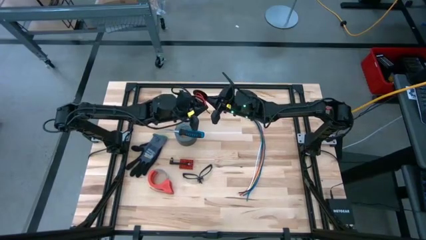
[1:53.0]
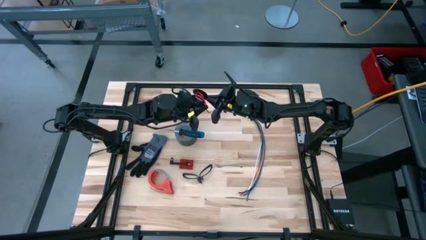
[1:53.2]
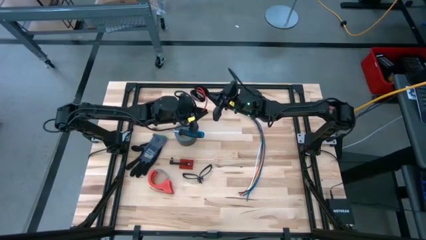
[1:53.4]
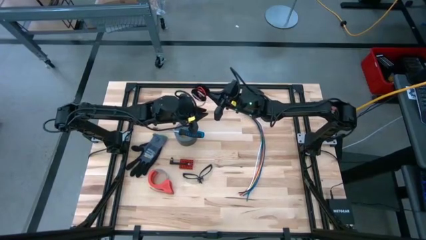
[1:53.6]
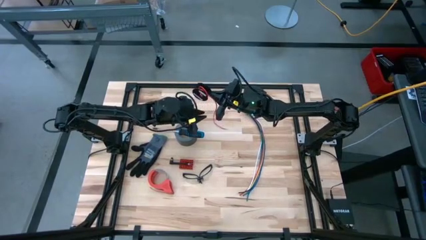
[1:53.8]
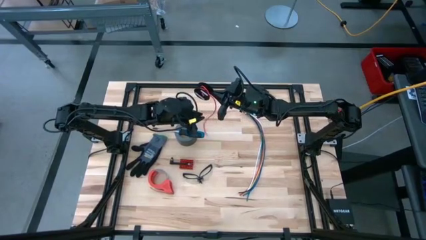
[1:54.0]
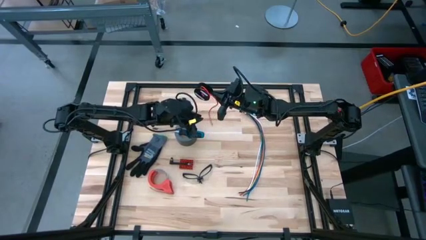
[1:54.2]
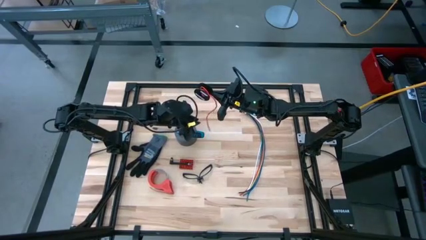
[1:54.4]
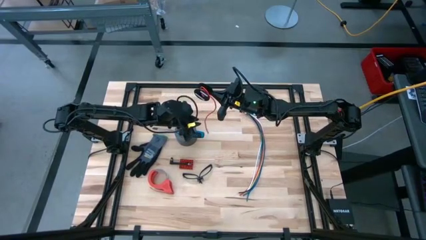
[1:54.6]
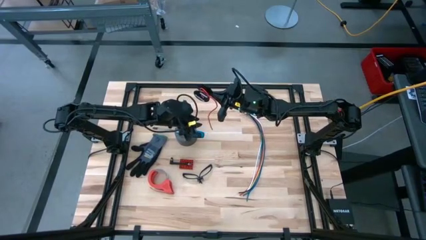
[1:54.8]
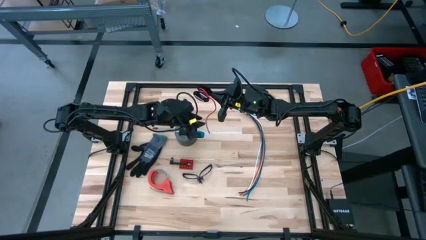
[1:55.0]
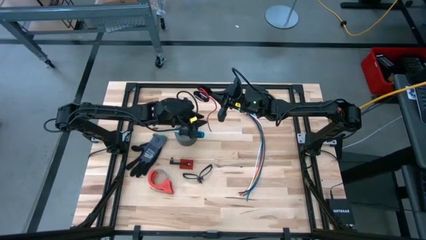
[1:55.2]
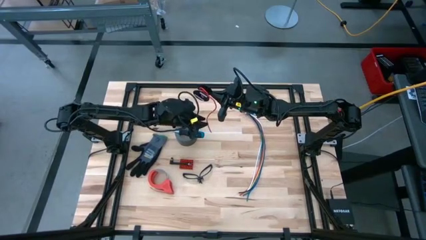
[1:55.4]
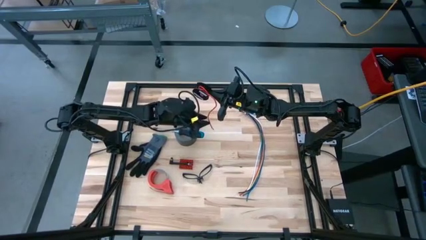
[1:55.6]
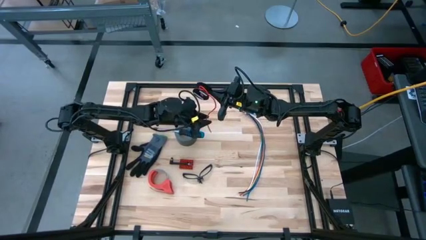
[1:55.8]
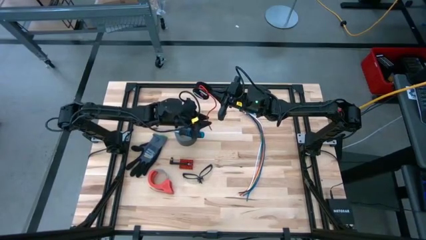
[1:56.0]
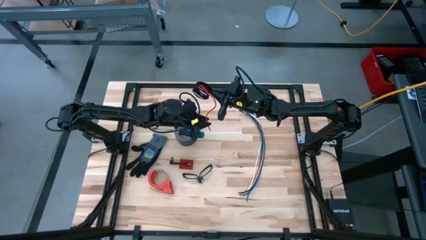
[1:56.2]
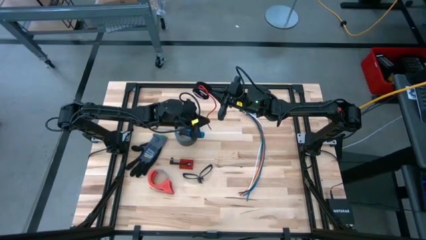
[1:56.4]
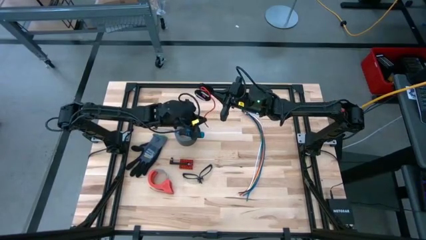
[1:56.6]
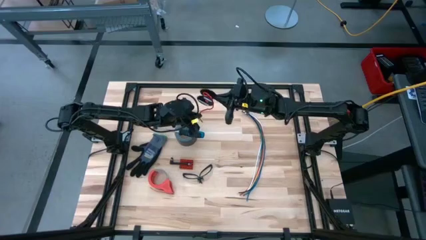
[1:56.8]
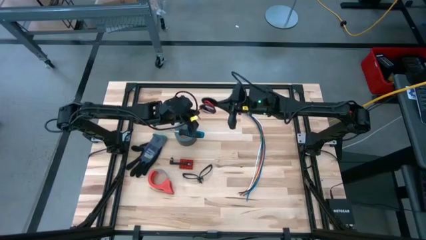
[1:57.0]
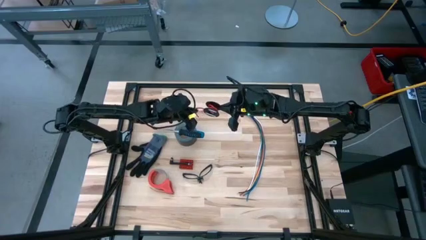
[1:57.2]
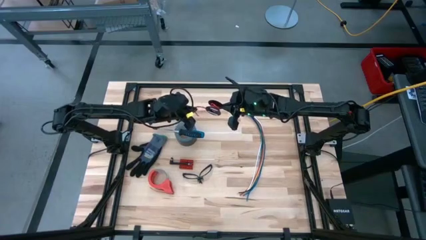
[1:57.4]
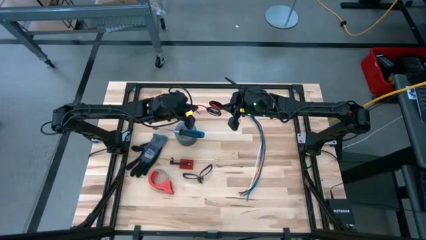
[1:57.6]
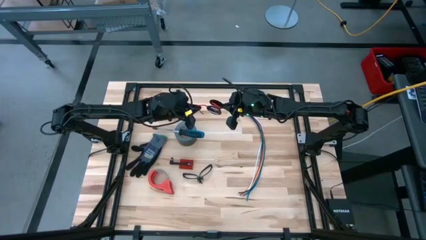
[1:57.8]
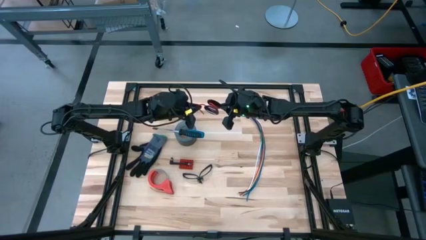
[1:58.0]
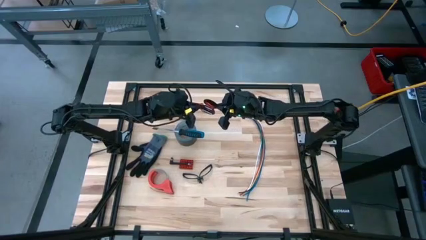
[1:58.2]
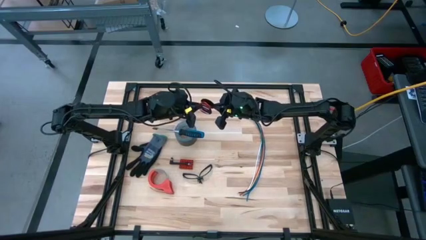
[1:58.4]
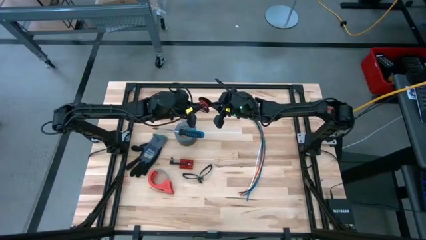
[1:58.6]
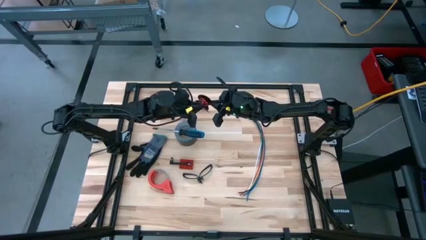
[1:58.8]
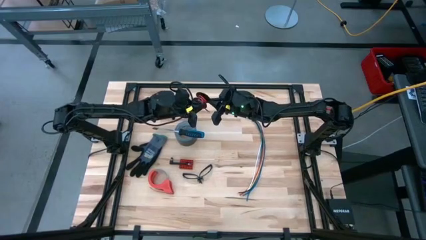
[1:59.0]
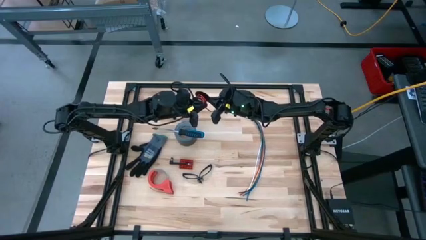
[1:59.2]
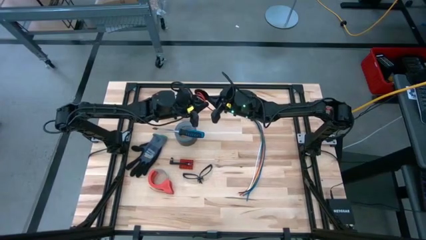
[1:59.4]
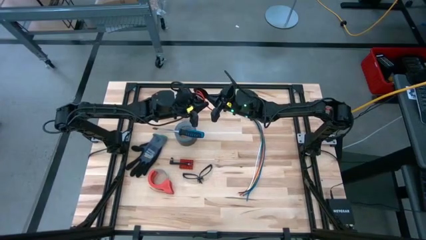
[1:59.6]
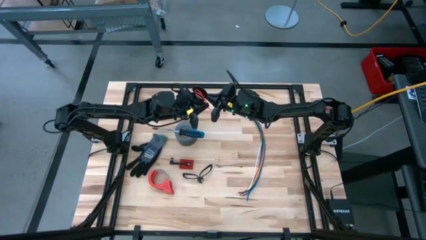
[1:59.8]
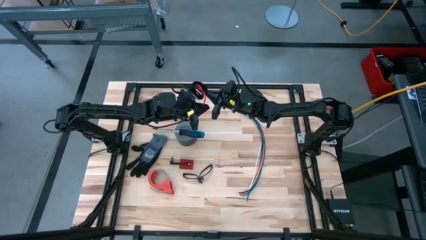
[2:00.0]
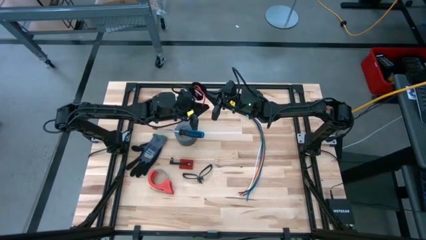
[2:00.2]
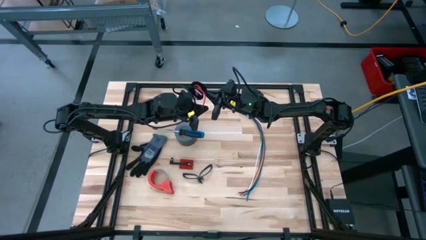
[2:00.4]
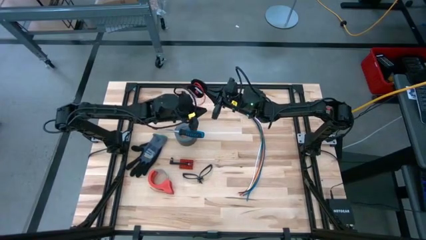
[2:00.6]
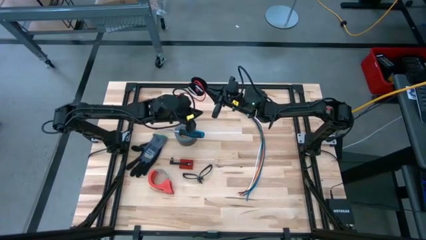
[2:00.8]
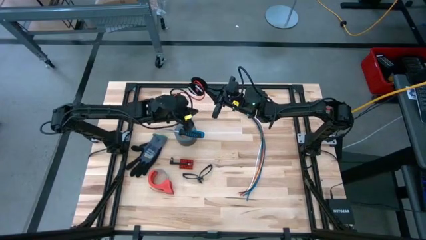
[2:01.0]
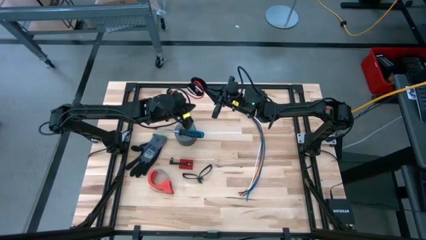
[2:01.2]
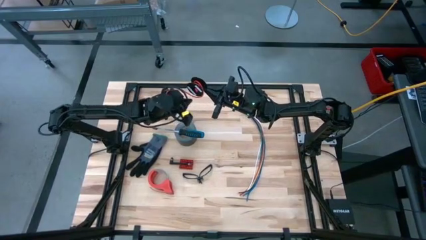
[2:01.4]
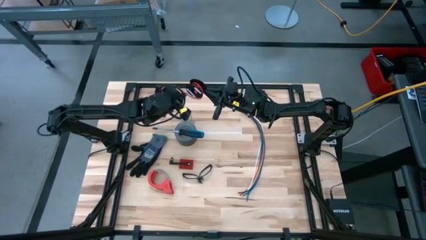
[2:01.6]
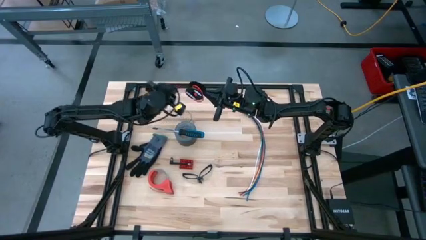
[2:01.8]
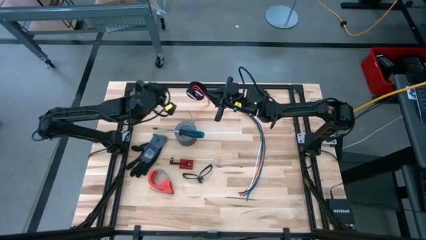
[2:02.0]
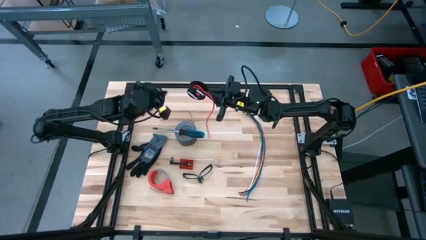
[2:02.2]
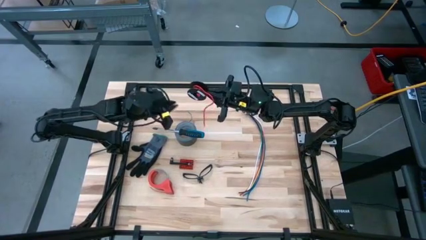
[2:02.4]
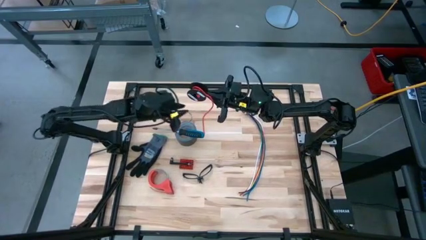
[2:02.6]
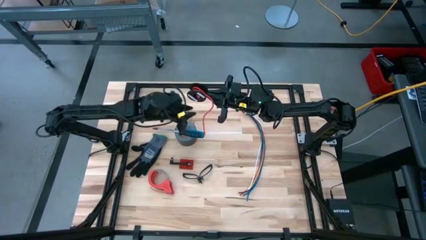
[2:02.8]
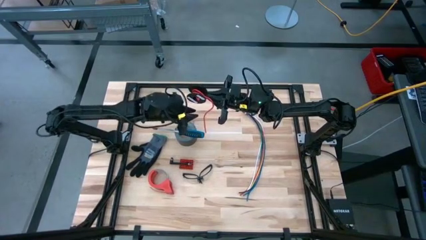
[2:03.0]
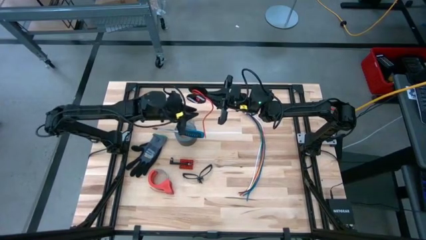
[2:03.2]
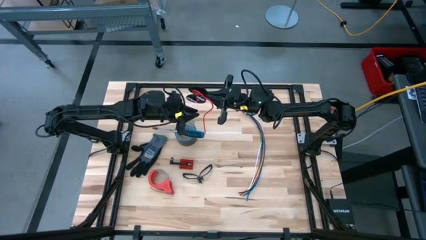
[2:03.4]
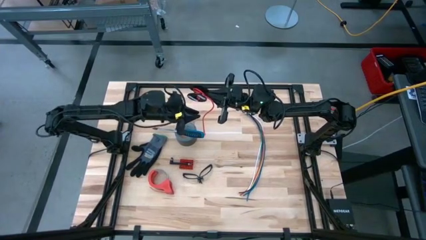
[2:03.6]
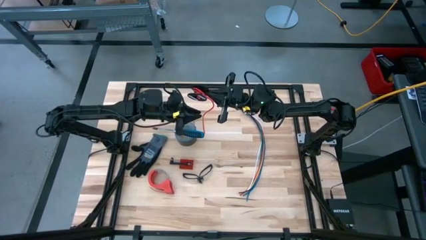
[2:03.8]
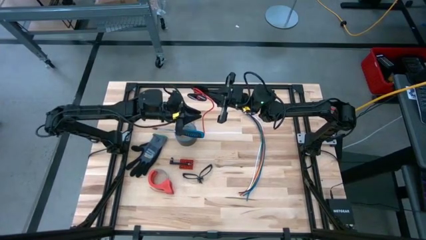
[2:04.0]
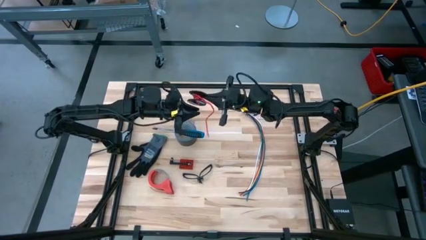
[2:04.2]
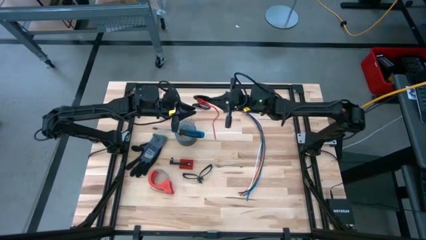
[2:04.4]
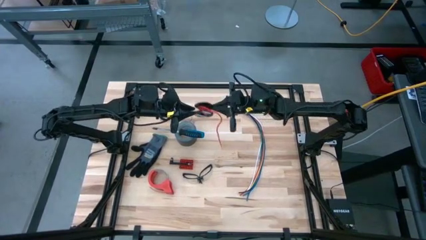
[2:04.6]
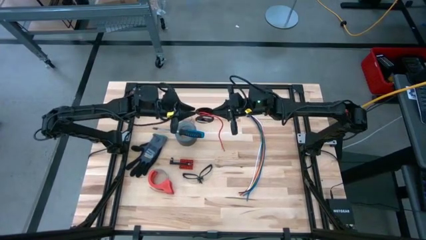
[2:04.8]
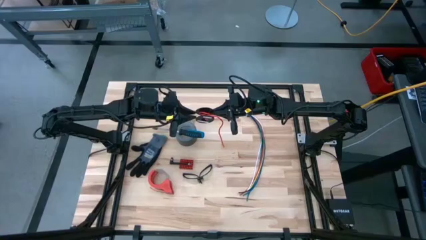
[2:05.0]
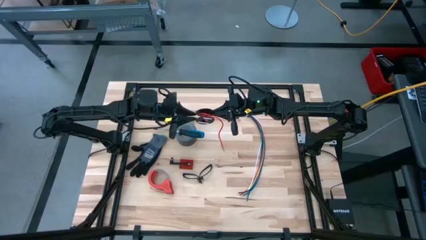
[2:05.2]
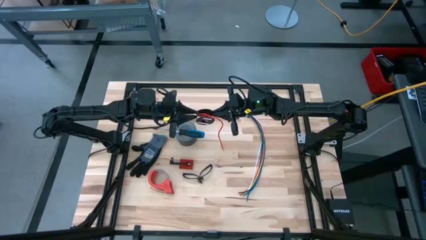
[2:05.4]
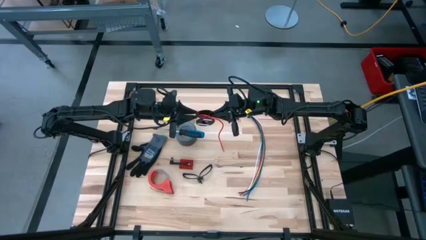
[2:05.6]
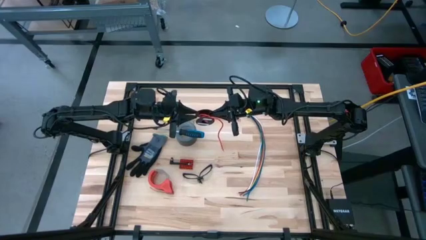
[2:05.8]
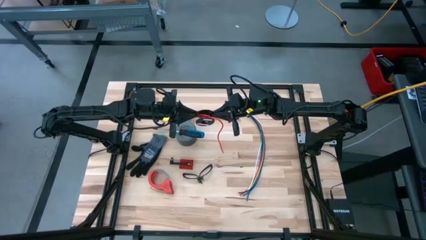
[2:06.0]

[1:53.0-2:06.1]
Task: Coil cords
Coil the red wire into the black spool

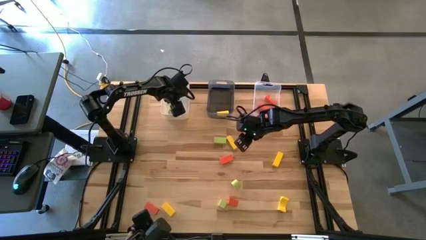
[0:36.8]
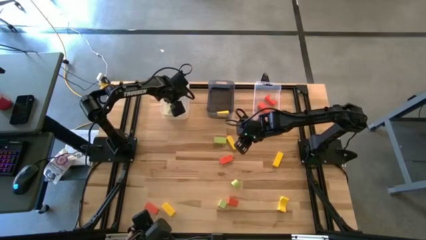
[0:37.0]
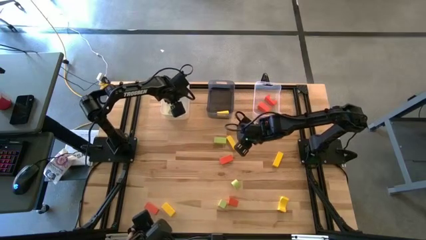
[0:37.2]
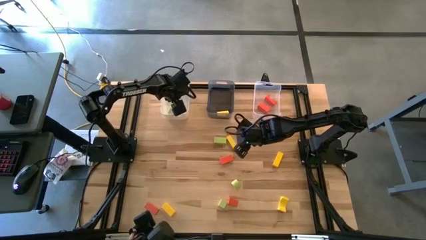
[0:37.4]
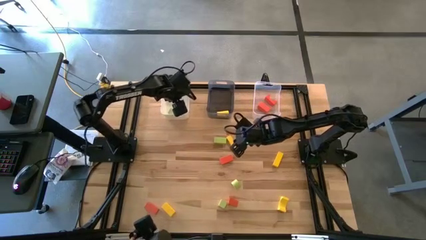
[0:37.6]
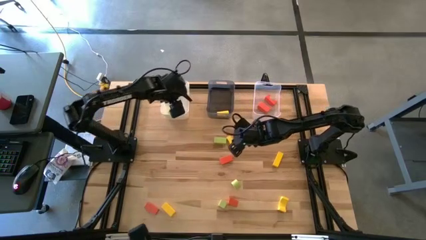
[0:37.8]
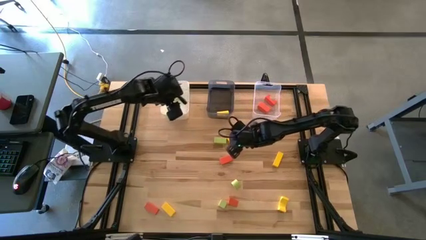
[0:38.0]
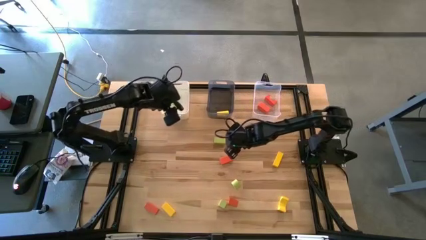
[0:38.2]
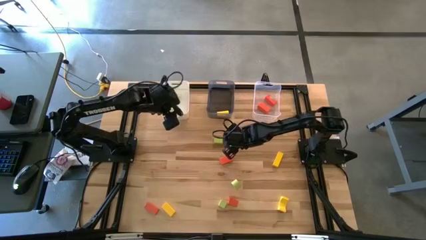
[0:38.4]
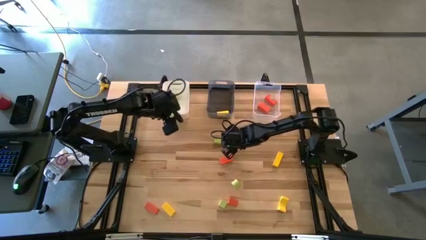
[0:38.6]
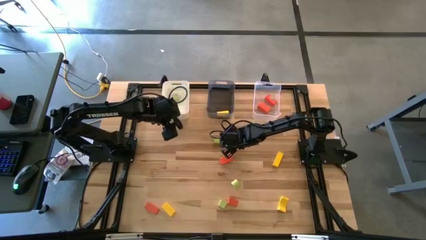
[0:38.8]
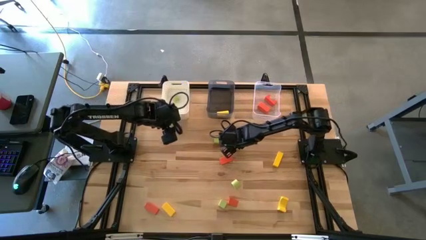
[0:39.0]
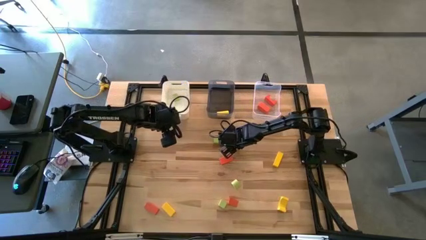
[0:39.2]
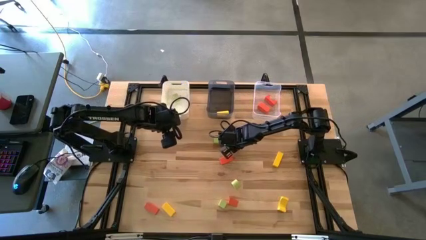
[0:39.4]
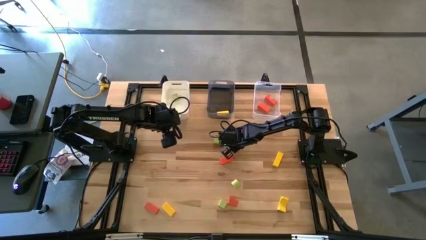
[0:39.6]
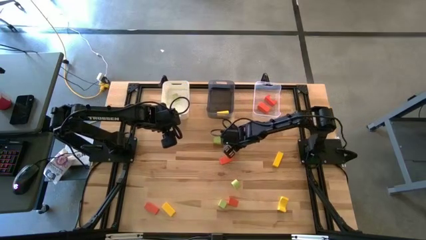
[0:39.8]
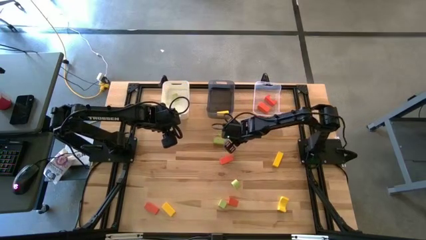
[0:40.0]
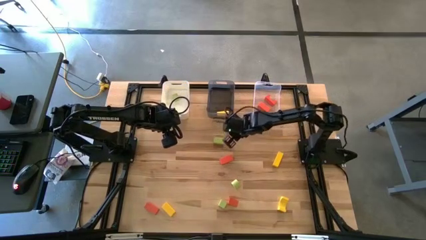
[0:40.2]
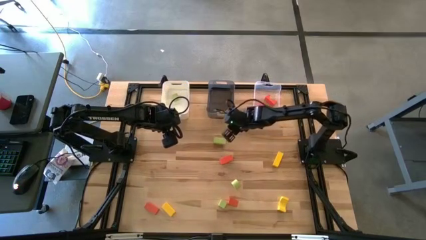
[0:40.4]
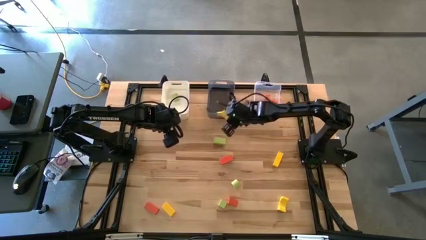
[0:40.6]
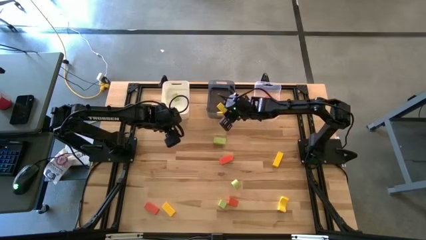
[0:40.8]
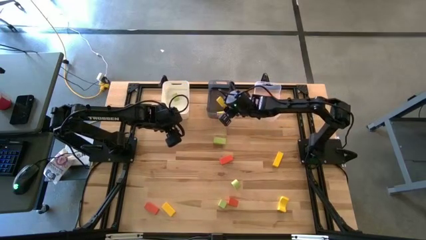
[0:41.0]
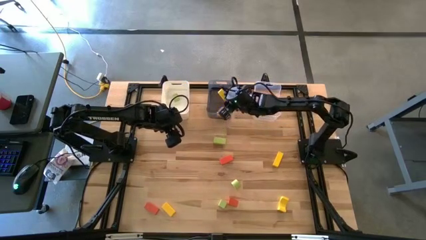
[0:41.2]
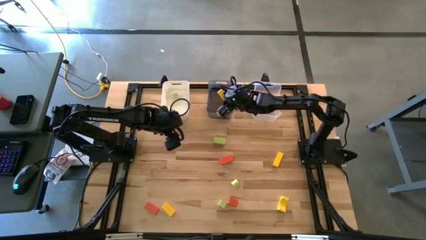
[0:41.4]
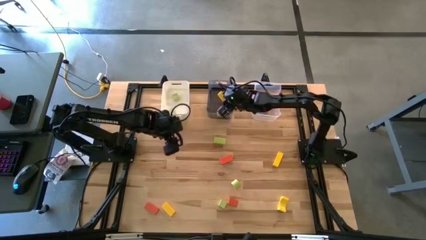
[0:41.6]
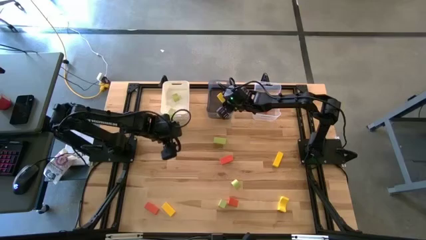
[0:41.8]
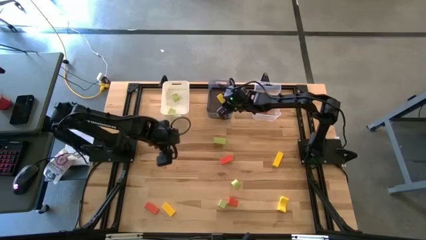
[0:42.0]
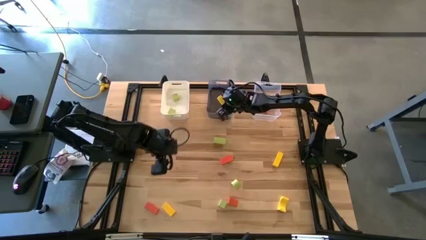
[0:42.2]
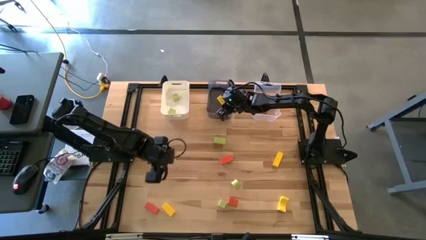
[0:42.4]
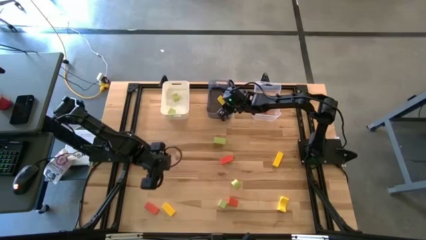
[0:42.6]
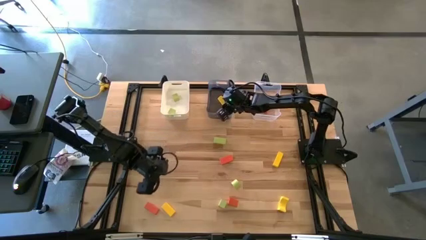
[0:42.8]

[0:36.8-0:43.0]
Task: Sort & place blocks by color
Put the yellow block into the black bin
